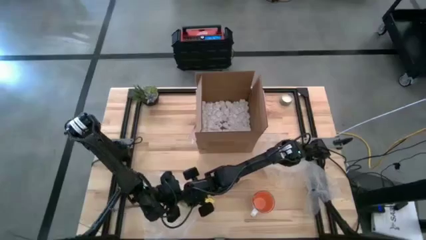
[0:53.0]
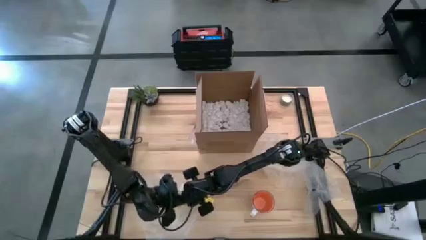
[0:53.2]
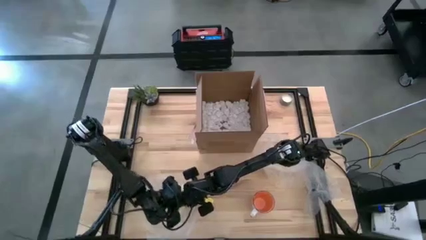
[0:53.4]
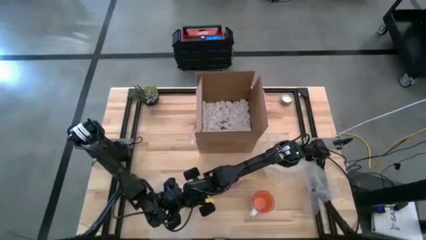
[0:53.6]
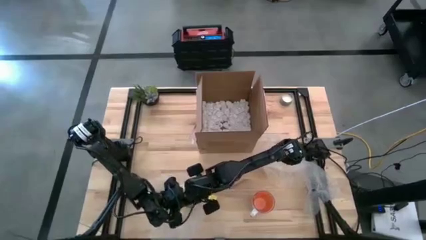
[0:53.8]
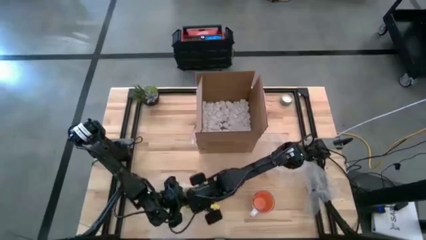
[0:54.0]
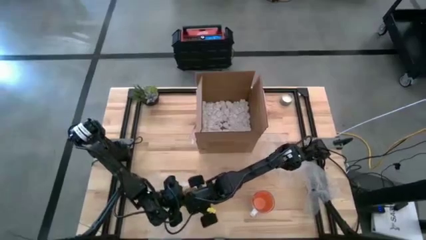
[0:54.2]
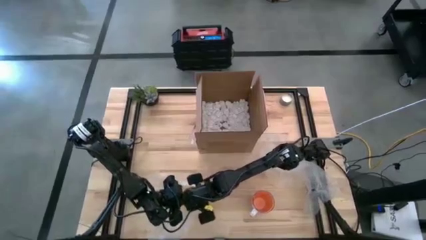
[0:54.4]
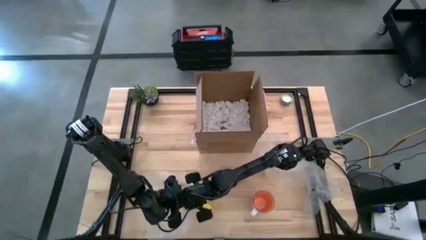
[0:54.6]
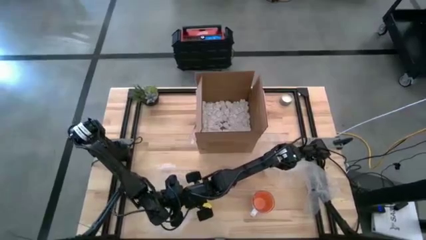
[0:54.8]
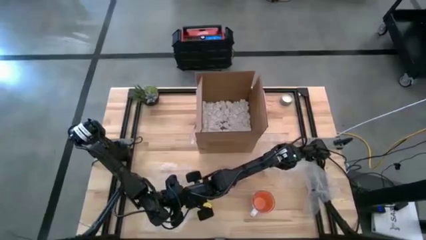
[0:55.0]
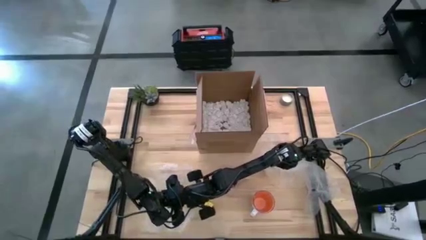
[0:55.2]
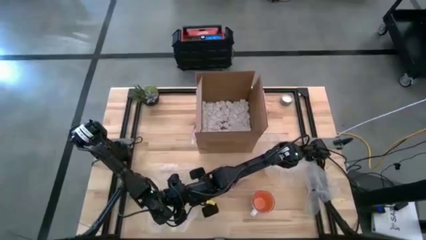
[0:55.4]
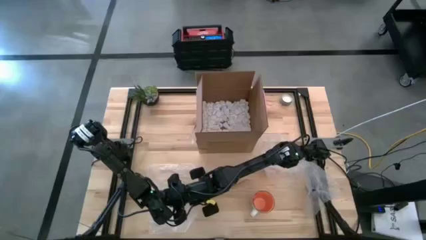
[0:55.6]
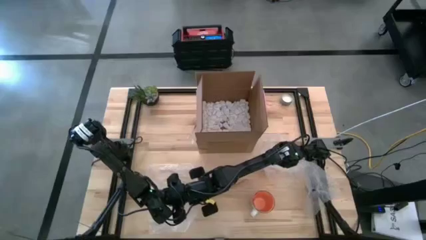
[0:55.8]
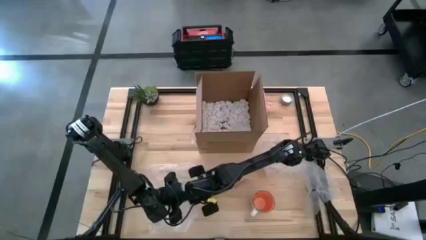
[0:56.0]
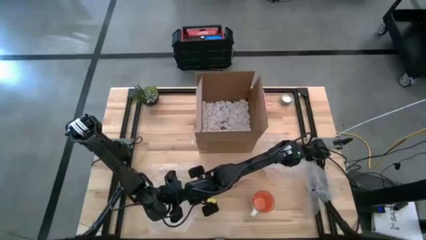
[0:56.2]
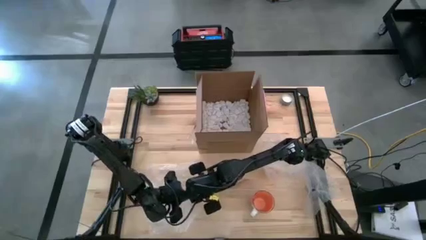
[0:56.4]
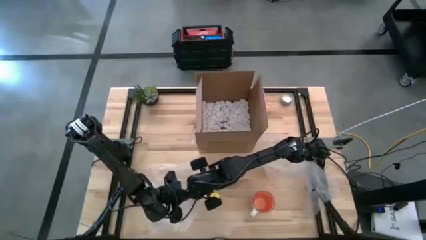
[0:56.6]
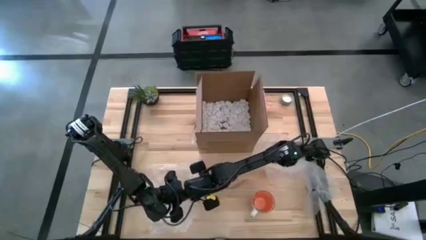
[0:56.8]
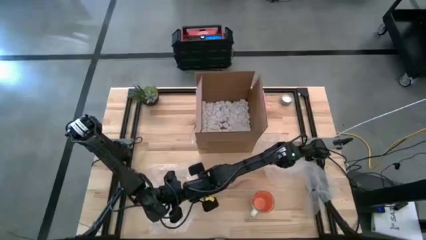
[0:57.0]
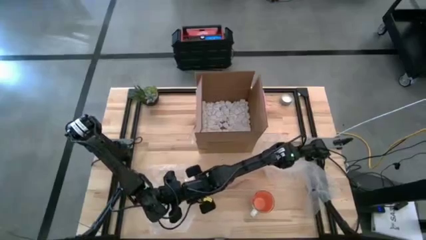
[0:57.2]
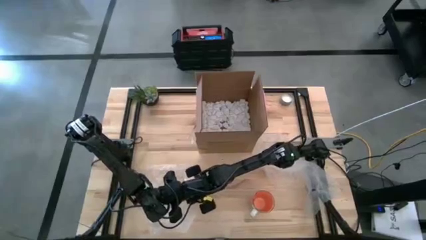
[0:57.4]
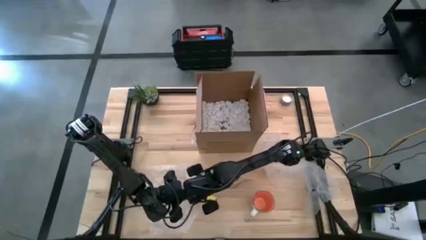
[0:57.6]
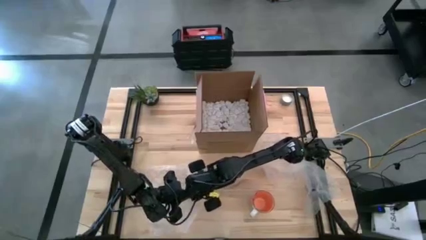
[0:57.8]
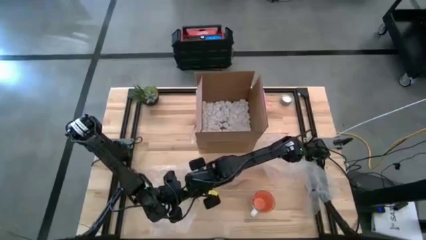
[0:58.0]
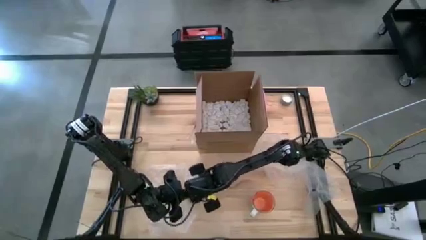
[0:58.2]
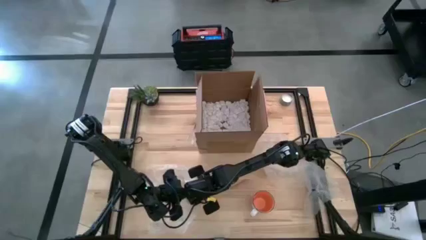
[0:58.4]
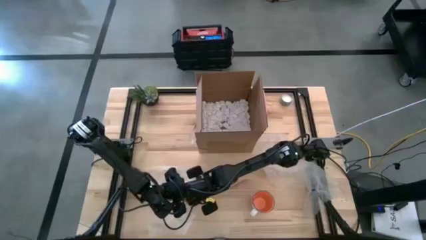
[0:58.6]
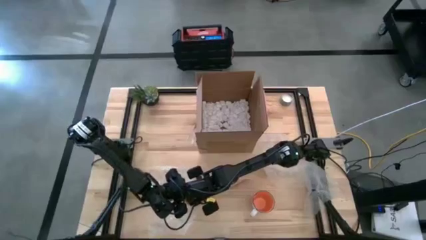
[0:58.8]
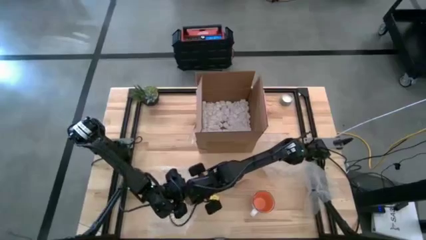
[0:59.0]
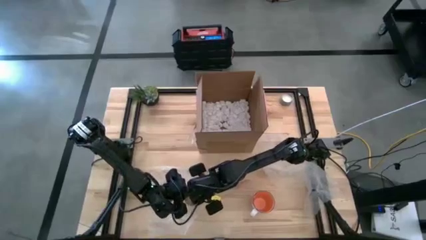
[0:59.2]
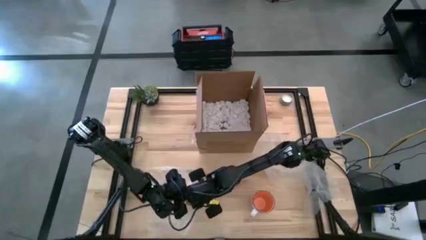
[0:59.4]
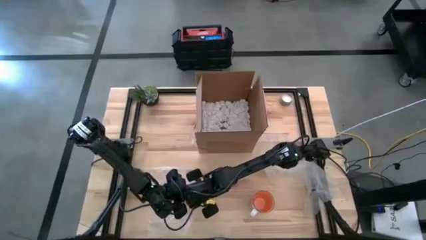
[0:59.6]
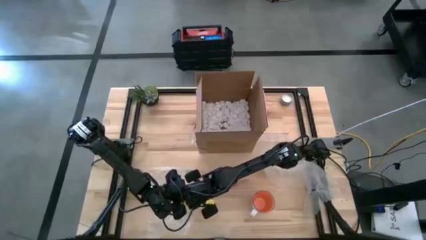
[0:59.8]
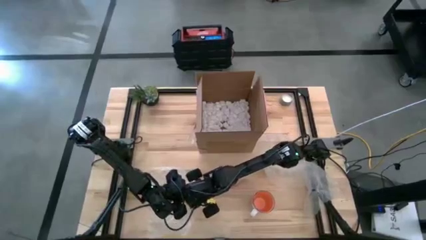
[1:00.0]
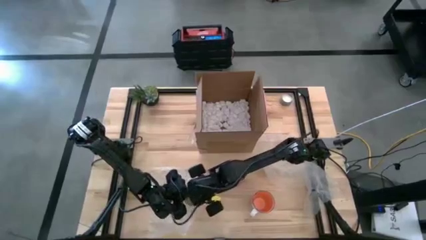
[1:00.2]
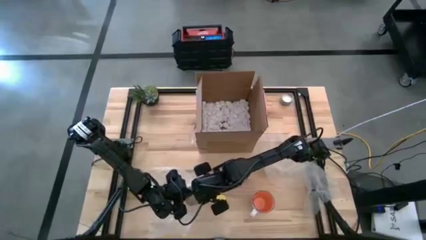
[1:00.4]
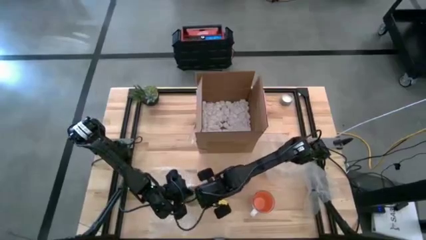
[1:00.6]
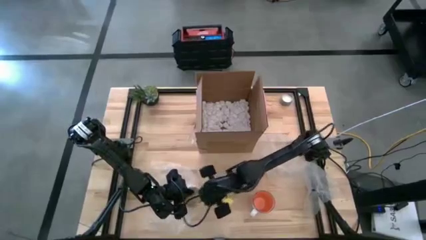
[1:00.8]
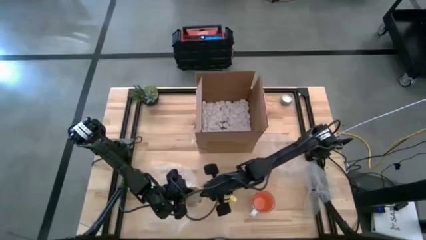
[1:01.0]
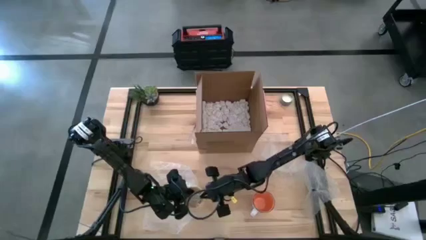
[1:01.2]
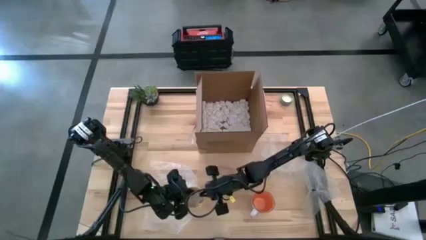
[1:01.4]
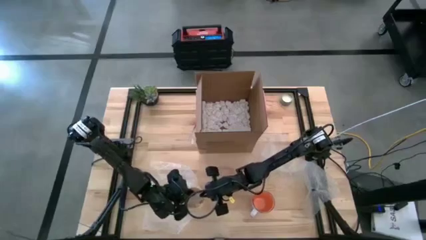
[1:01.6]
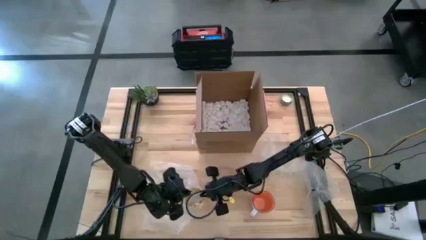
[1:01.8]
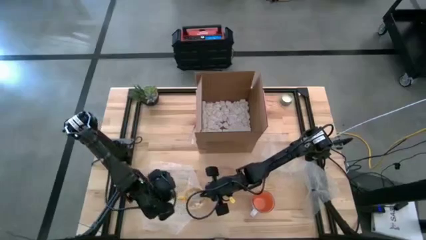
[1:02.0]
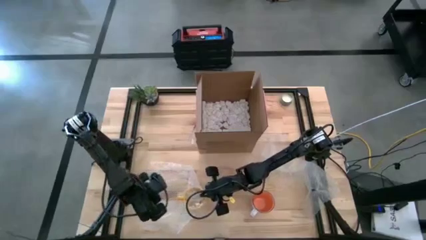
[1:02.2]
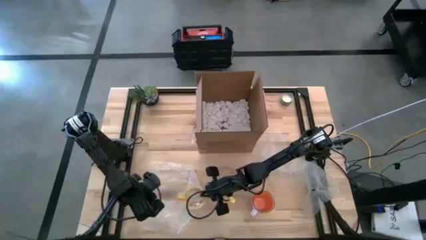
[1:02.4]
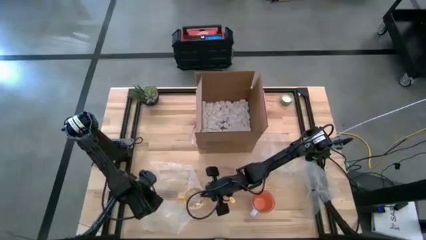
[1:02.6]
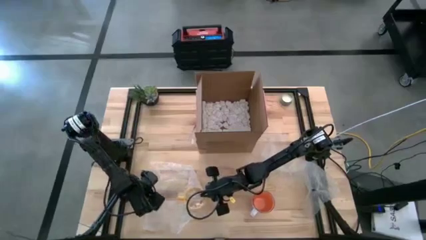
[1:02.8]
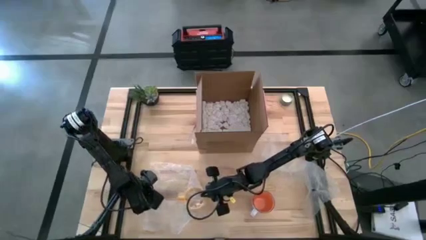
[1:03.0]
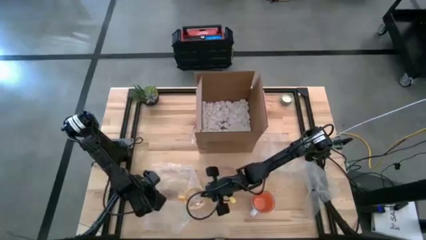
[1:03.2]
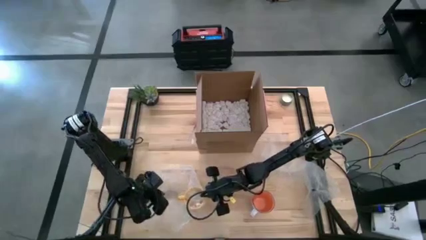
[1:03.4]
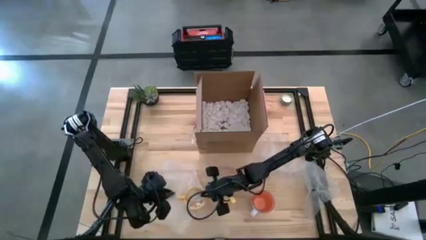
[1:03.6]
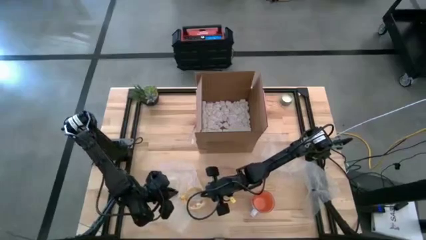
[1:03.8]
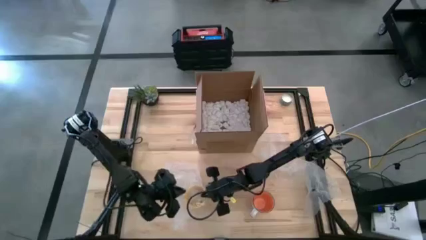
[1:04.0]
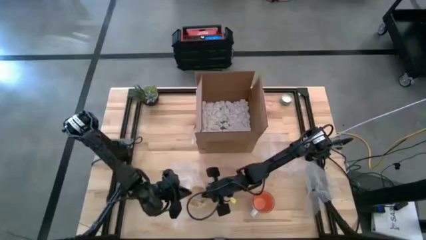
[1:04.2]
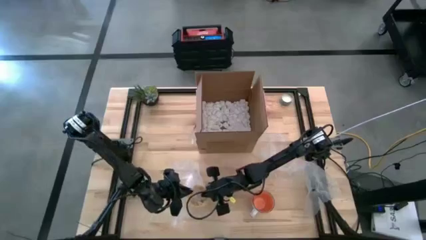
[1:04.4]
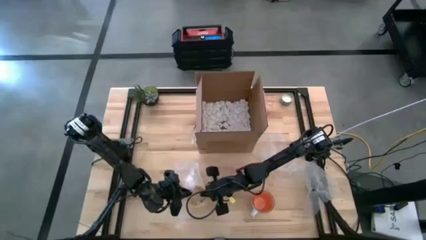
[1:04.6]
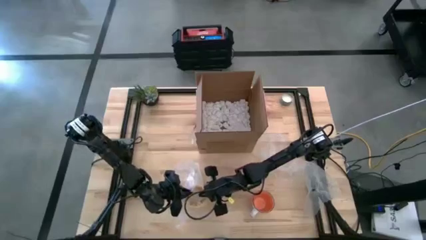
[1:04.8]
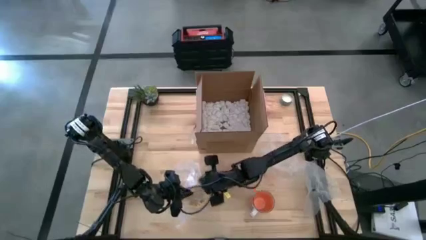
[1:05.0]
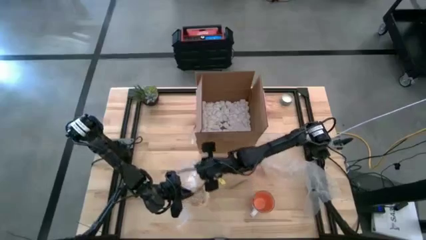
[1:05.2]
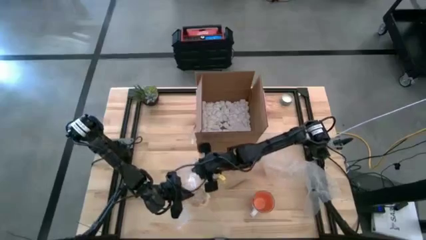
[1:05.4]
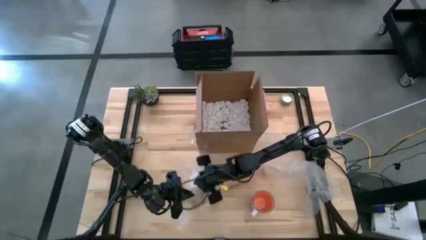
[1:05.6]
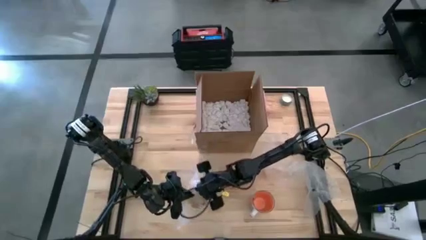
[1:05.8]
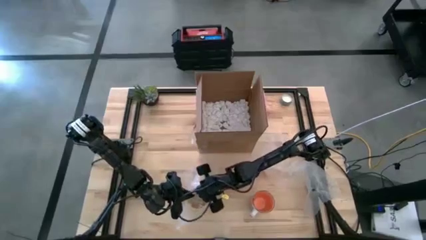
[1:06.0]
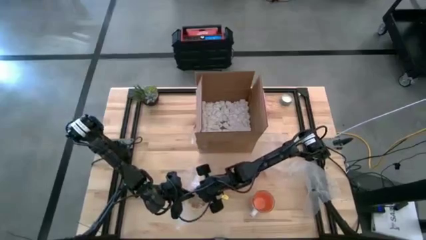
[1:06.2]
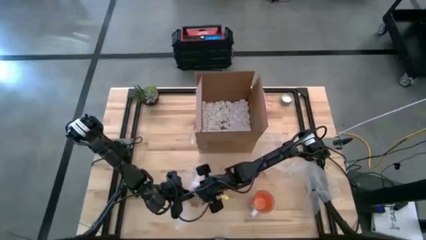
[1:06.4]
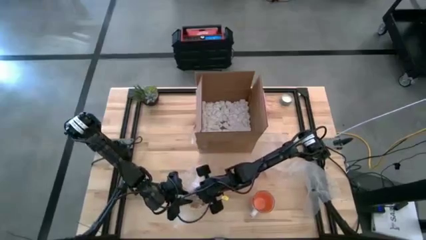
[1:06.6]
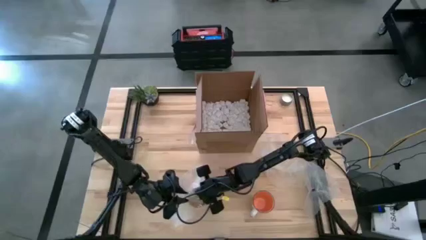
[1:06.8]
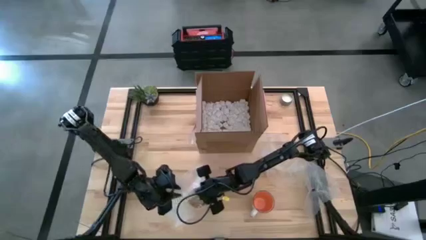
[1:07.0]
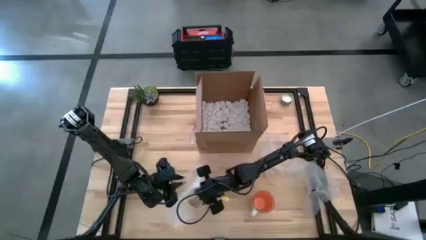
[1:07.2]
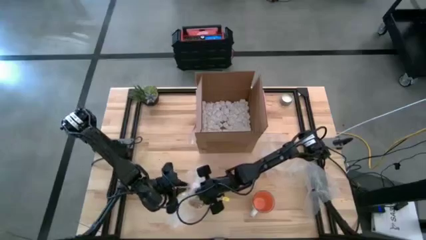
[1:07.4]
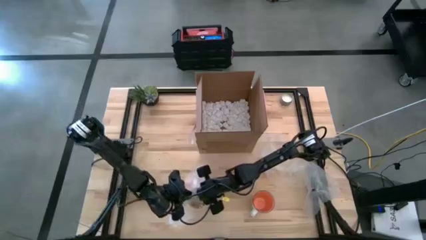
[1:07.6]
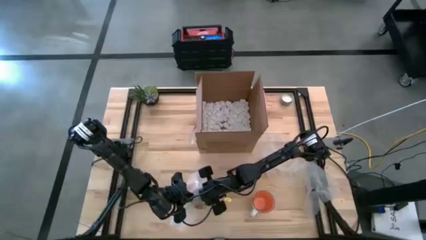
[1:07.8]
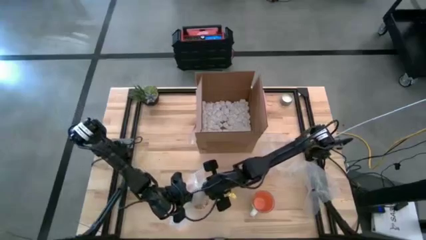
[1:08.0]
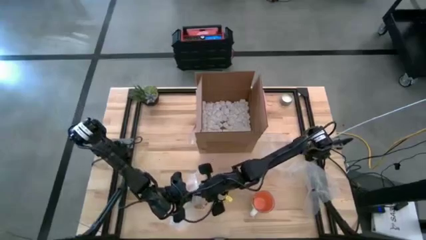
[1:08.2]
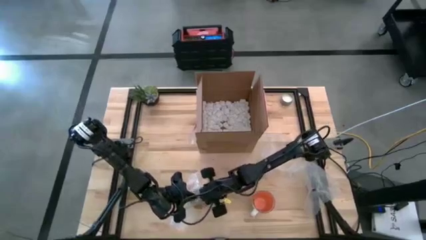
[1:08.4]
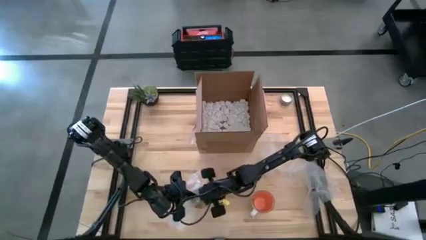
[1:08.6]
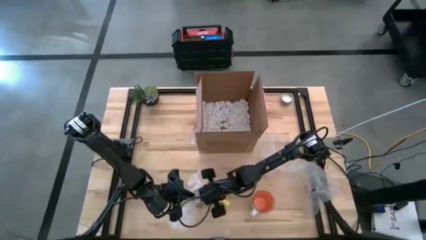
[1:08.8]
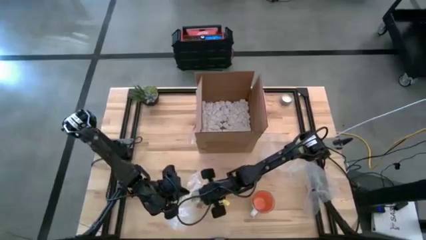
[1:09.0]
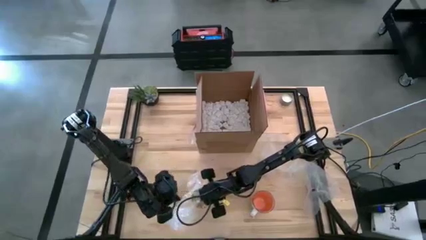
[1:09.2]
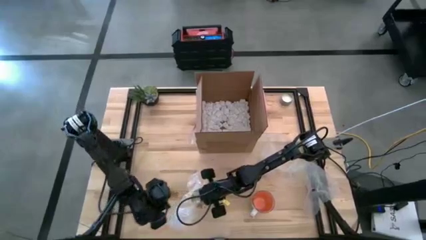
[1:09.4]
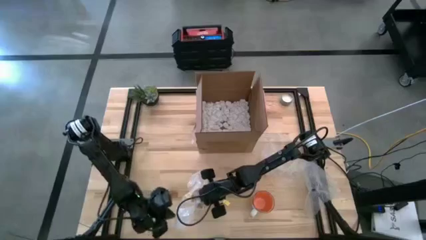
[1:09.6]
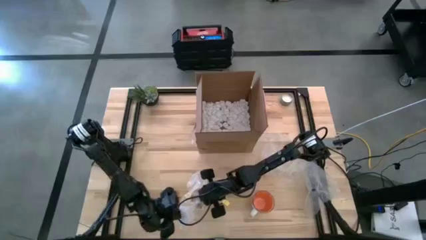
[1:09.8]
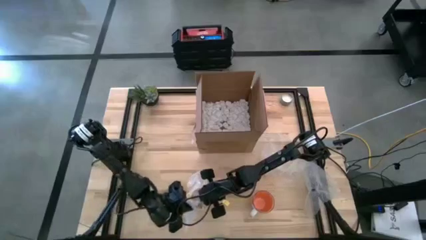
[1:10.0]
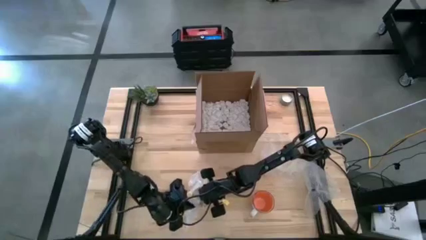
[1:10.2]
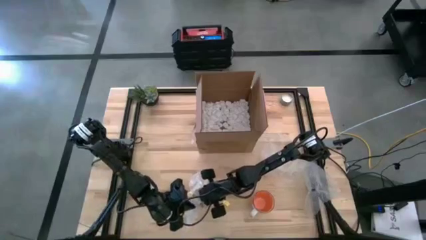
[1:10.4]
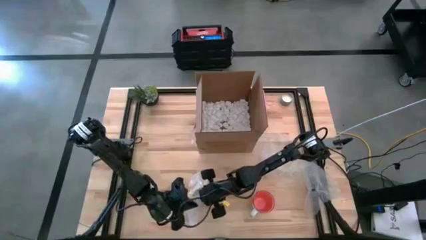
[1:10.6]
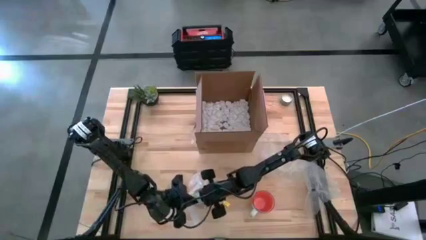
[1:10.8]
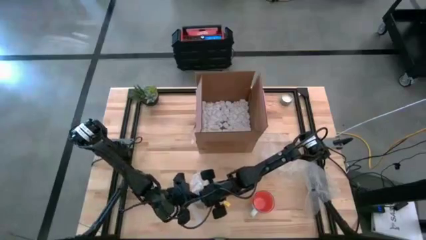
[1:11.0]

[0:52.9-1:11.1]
Task: wrap mug
Wrap the yellow mug with bubble wrap
